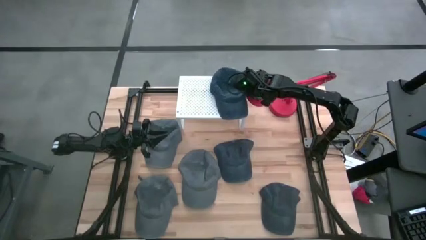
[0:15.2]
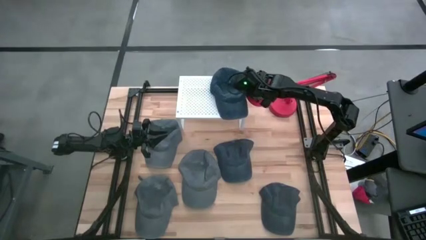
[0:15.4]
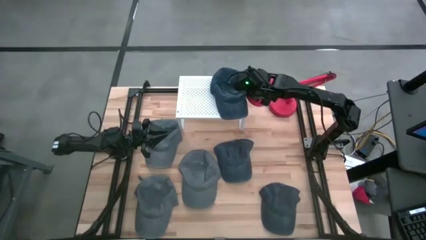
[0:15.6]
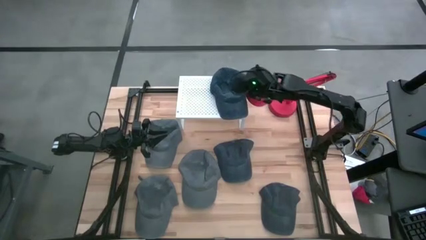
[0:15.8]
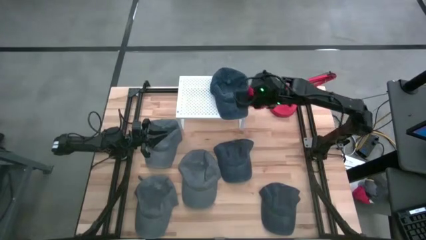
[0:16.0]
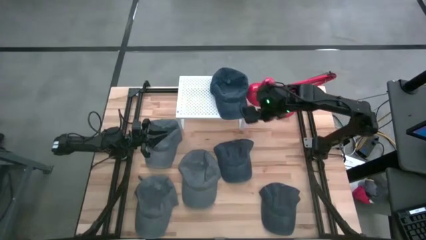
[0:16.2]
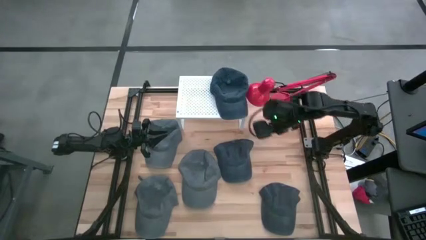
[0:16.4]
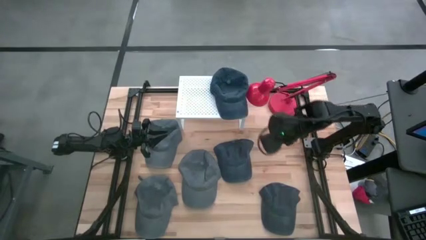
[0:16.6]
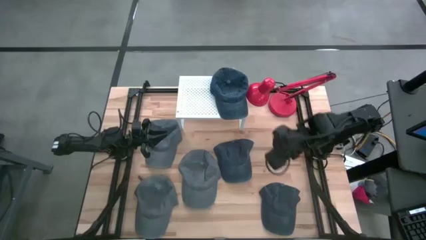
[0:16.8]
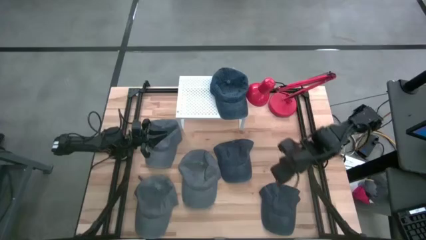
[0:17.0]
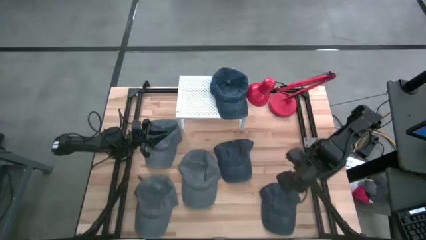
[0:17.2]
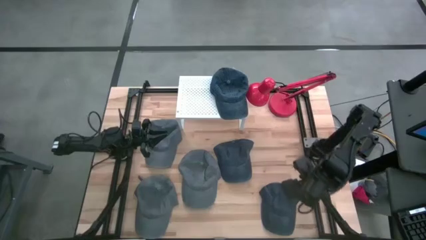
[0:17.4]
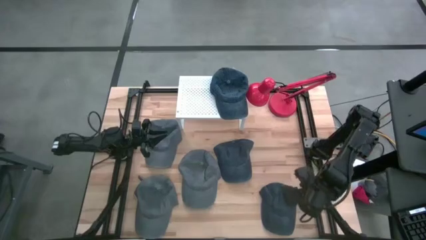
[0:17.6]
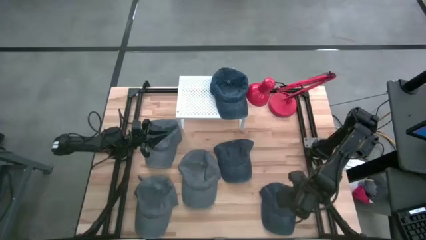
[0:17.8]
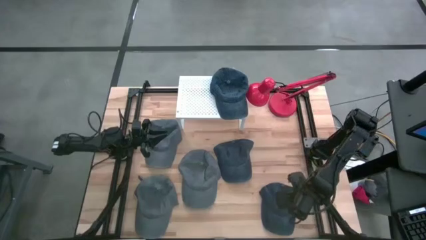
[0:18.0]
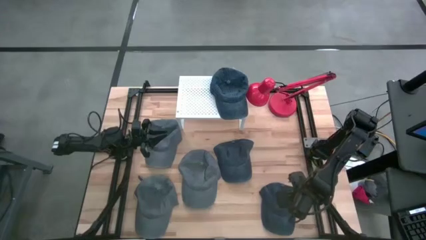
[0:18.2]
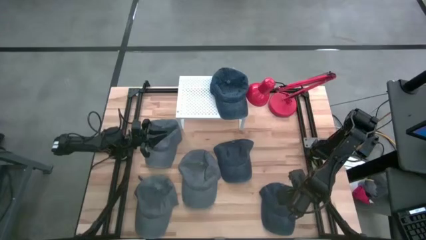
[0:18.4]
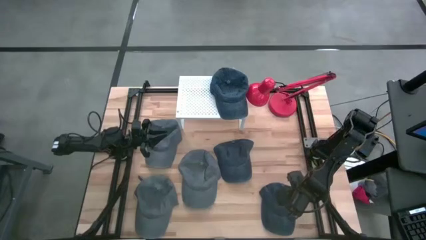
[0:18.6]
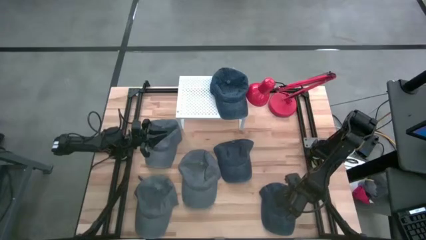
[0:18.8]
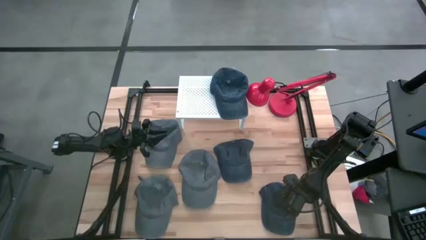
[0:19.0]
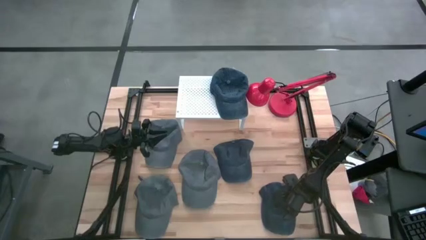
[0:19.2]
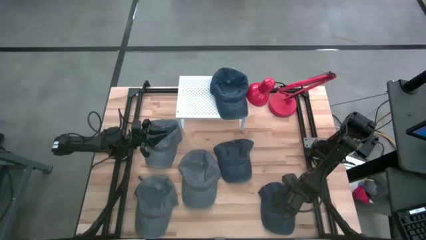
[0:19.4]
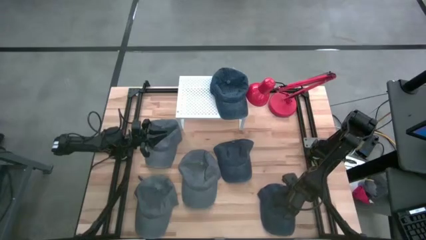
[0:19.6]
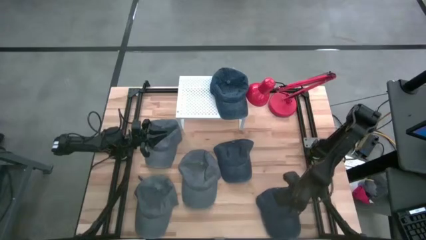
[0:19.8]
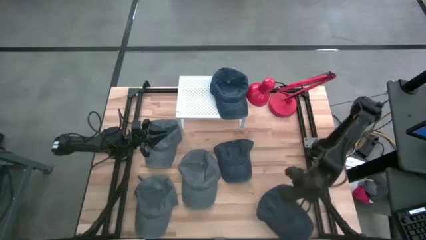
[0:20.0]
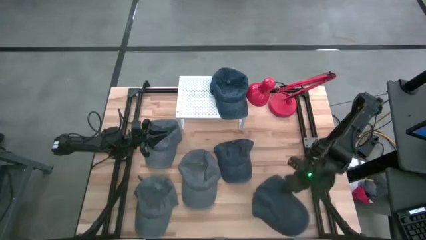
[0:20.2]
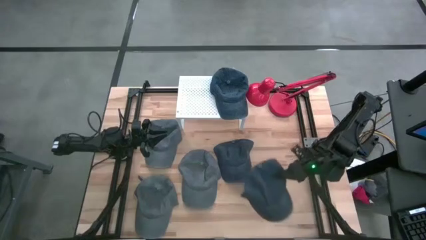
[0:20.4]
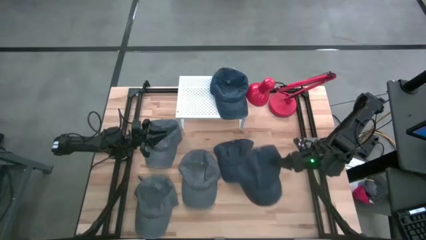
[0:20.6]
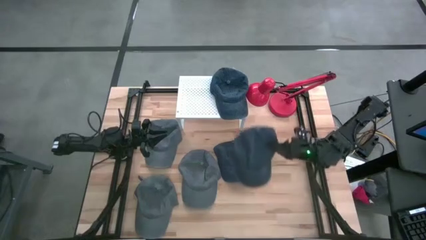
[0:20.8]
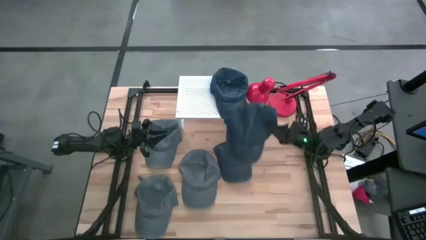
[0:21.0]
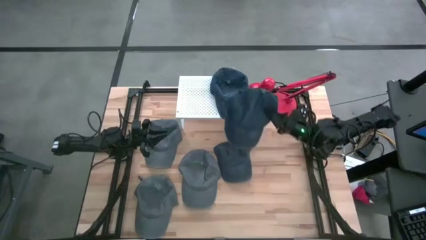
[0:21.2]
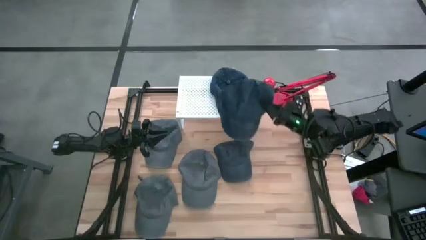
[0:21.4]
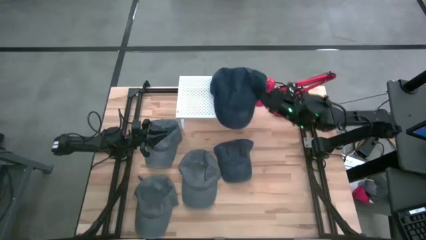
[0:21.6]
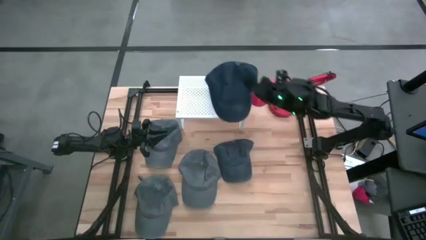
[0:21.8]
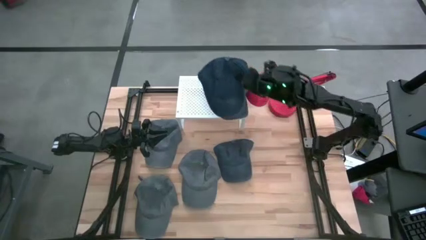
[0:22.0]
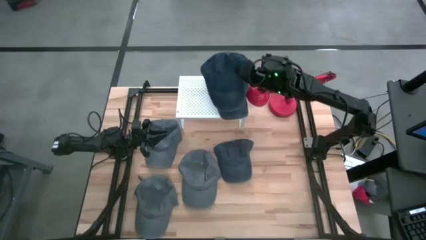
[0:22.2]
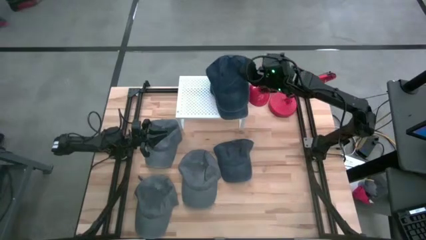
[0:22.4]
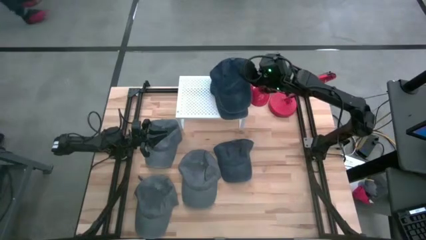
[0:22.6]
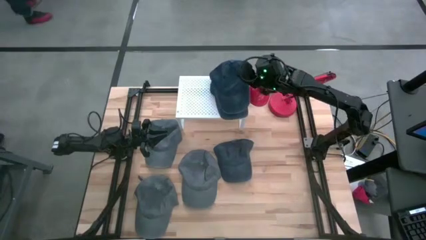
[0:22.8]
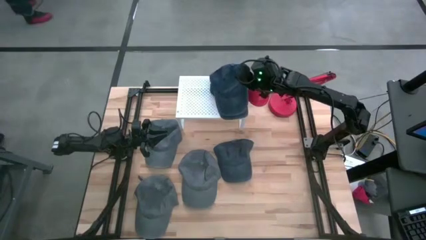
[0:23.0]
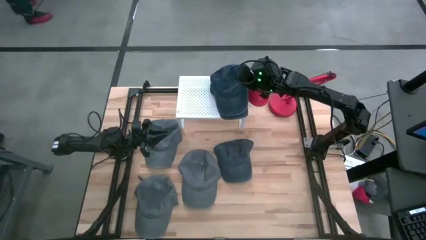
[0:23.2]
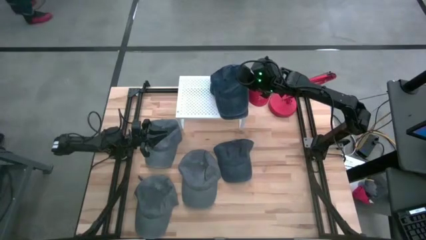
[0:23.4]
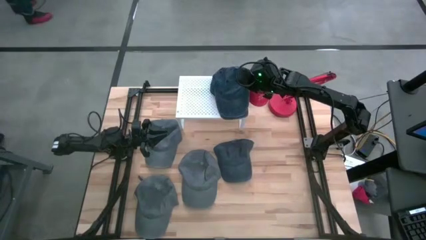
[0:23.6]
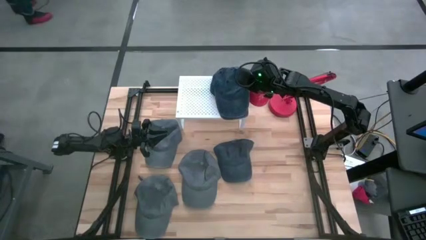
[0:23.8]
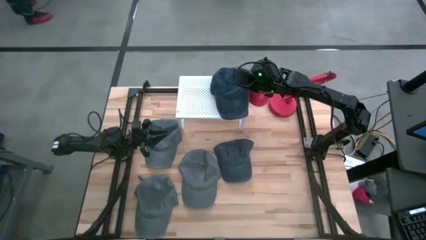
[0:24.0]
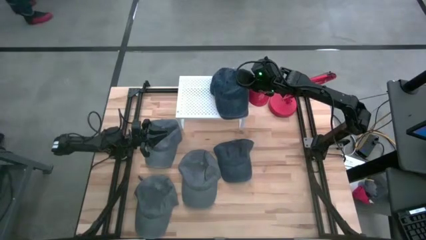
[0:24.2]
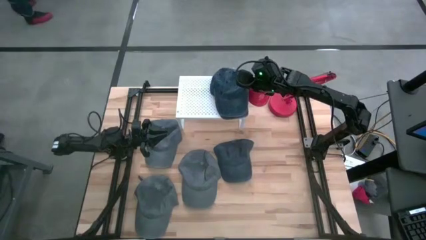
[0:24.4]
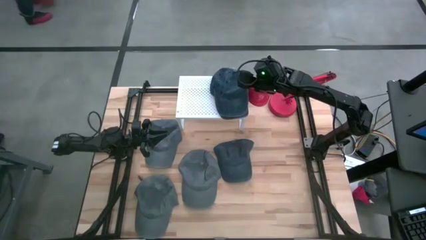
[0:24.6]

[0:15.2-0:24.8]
Task: Pick & Place hat
Stack the bottom black cap on top of the black cap on the shelf

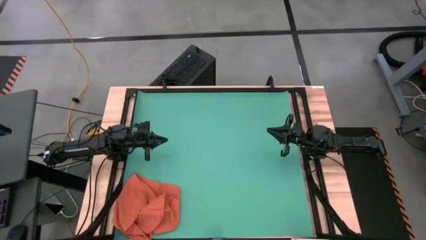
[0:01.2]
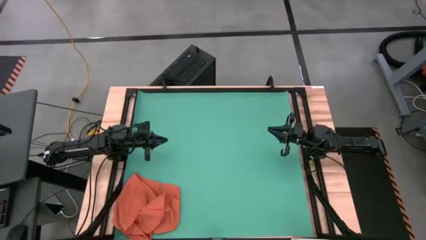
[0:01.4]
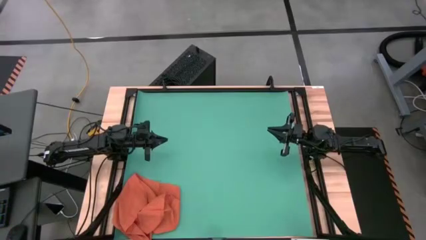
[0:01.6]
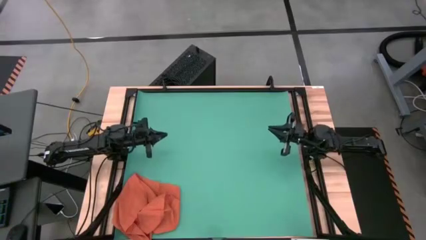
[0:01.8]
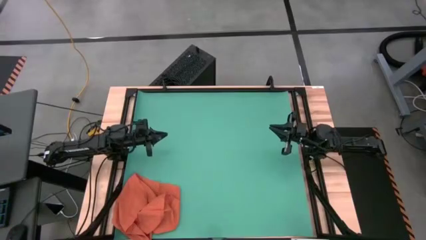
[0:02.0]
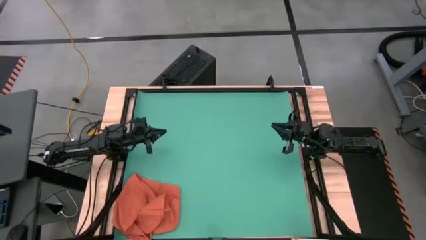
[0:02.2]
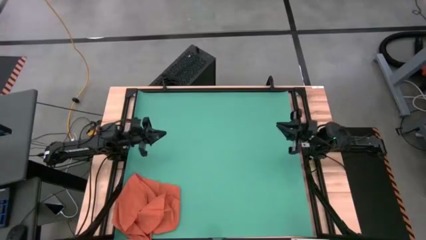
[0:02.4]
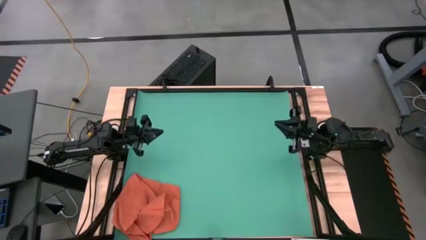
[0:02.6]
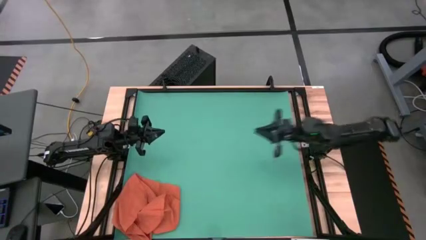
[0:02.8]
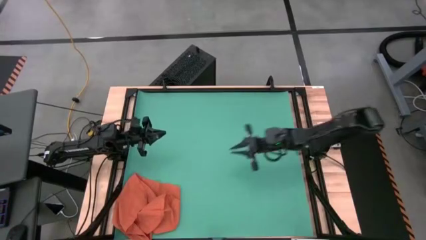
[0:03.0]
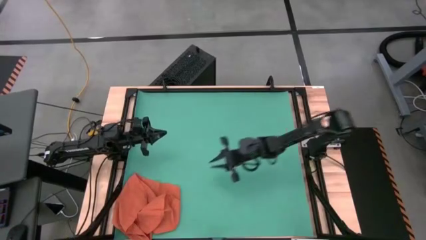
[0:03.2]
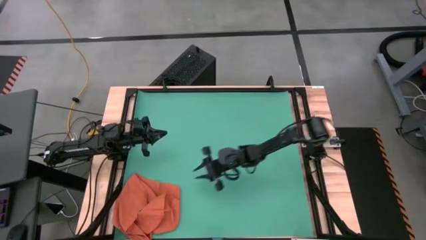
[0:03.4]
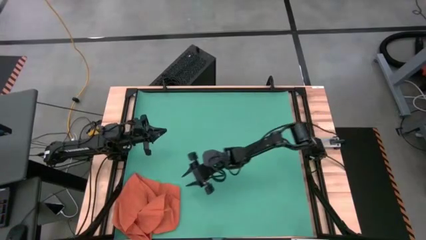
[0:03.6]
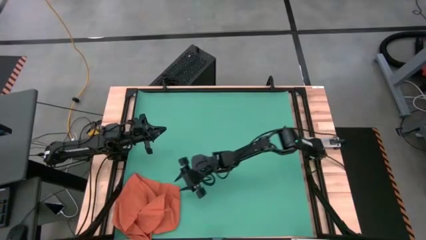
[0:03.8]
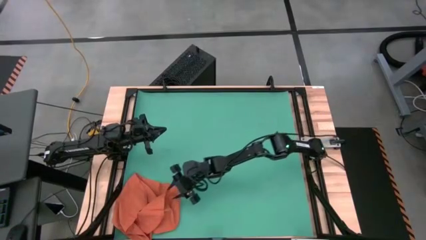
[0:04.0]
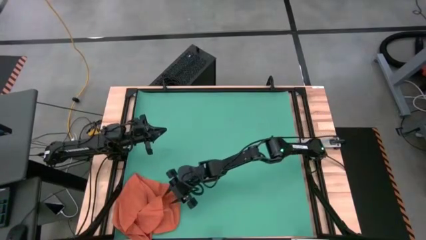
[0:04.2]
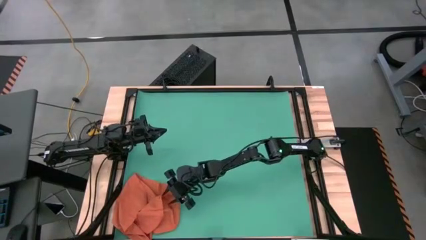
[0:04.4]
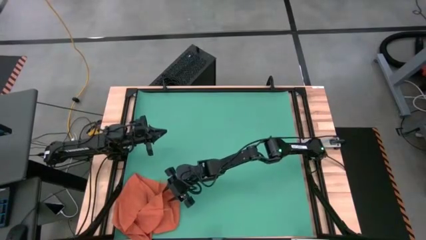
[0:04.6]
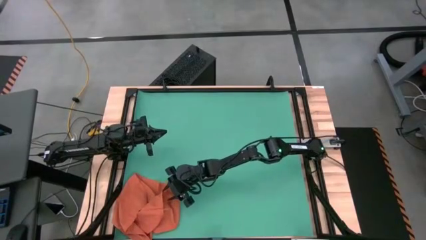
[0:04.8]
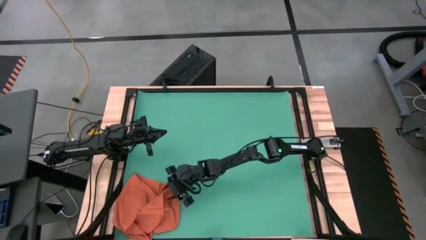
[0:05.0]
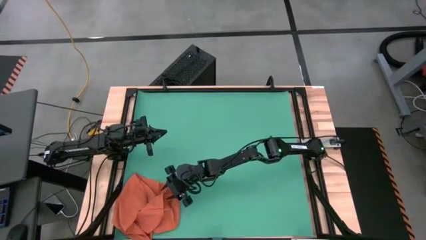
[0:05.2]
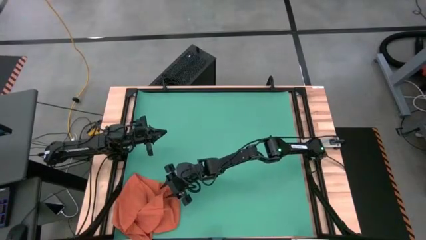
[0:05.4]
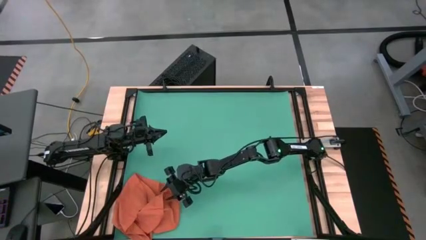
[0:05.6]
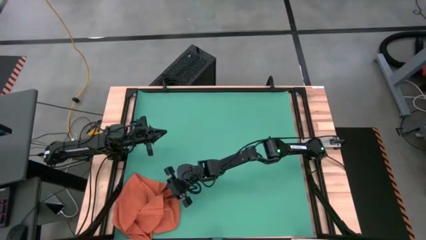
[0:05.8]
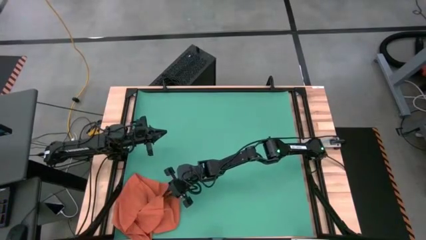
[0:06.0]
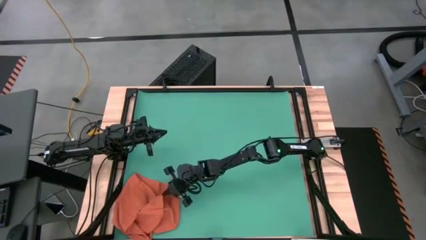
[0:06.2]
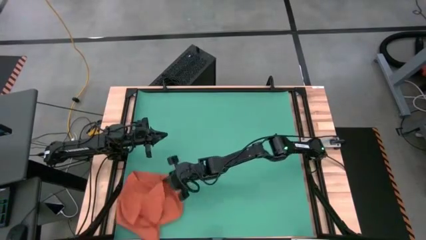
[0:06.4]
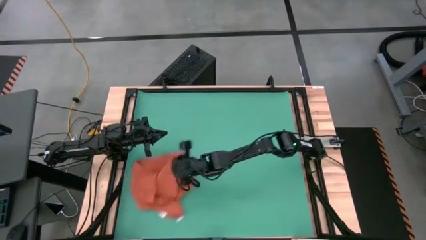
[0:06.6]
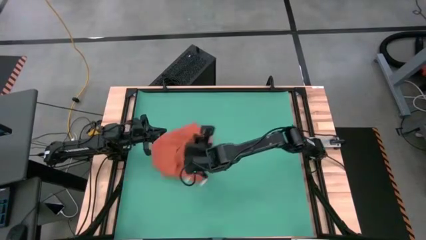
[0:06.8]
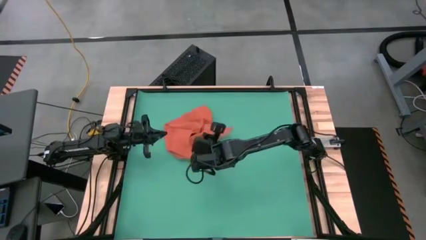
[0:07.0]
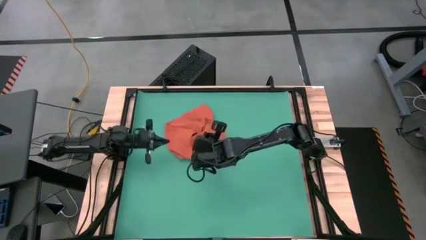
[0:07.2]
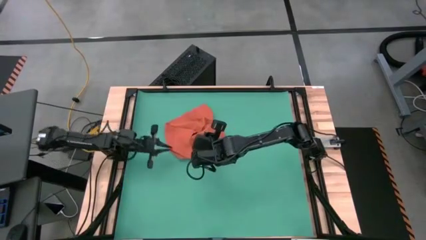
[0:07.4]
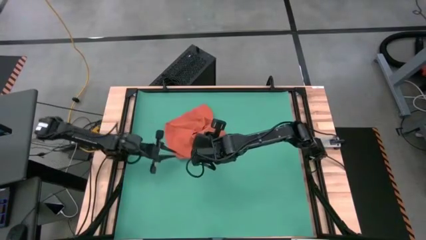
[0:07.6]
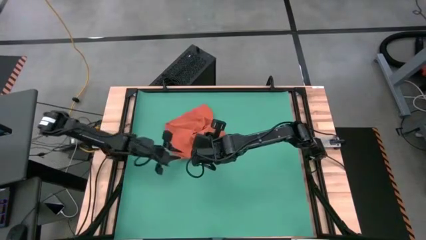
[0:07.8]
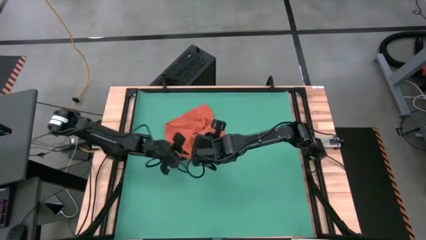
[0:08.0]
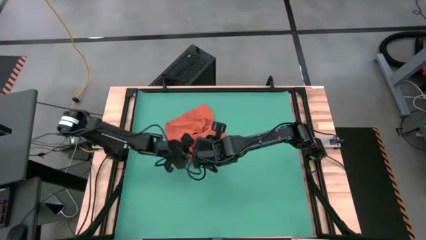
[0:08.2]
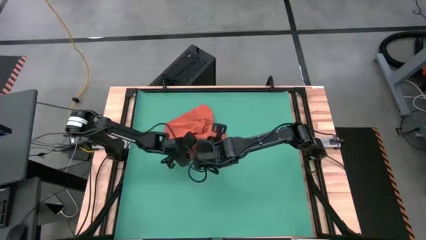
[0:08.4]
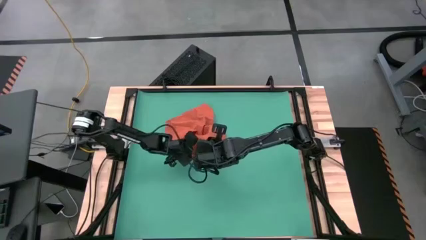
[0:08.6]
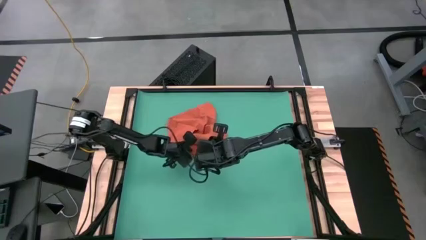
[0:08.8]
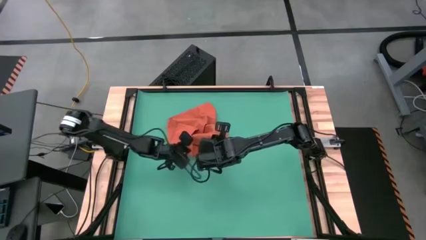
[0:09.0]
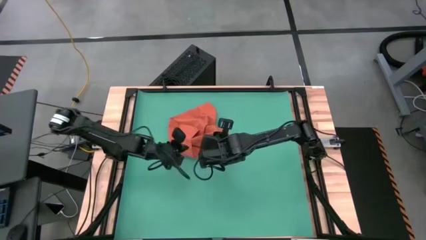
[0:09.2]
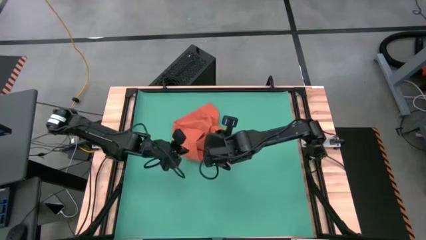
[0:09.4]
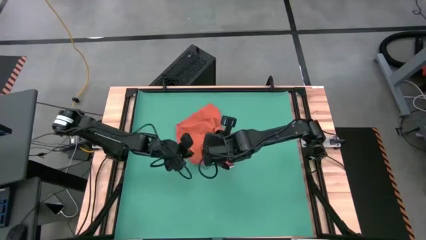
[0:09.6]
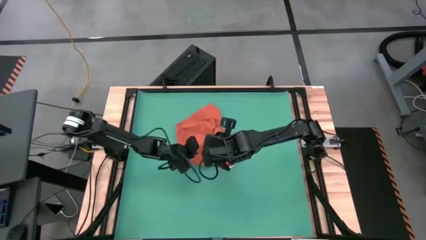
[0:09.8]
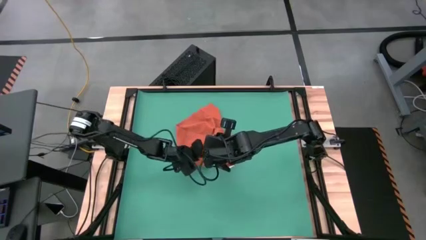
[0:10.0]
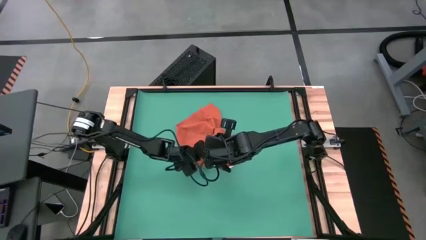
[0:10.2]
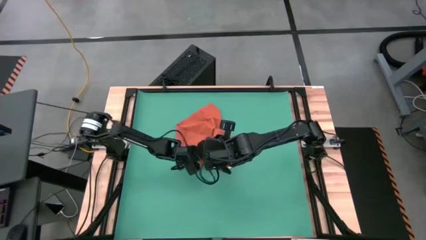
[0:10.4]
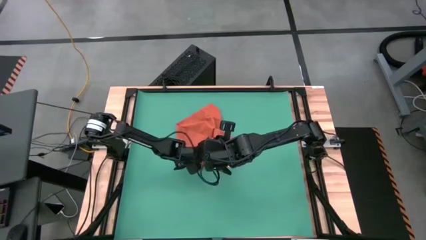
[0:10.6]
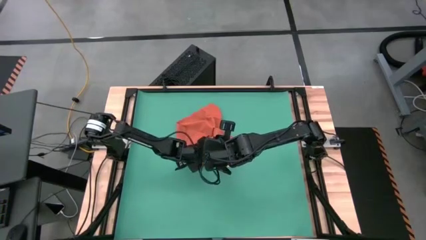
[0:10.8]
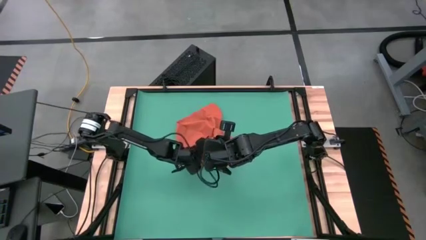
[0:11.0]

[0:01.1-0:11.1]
Task: Roll towel into tight, uniform cylinder
Prepare the orange table napkin
